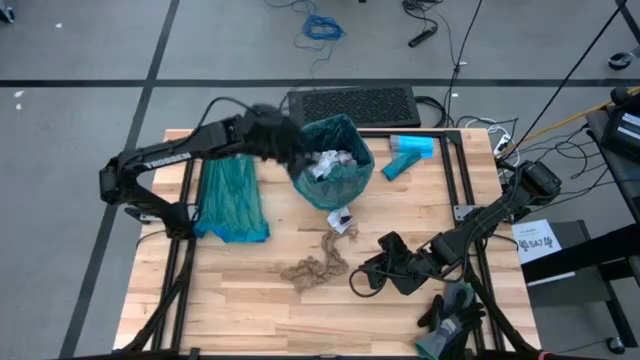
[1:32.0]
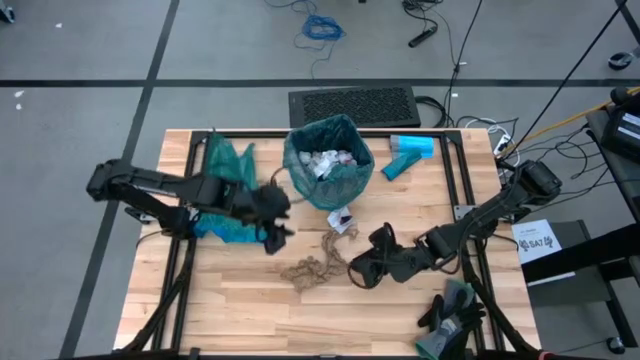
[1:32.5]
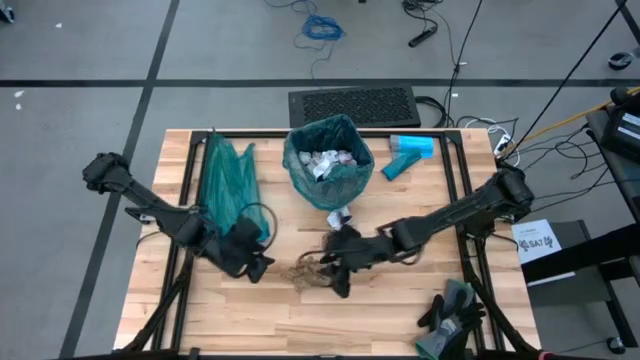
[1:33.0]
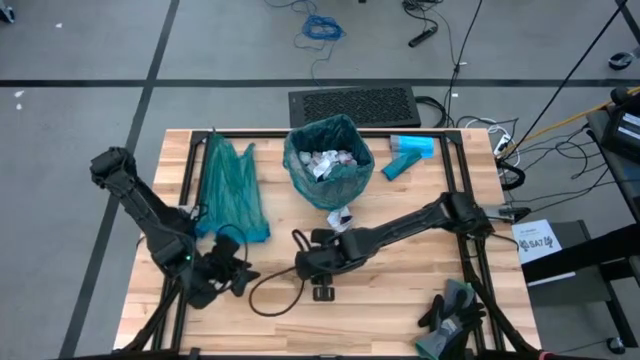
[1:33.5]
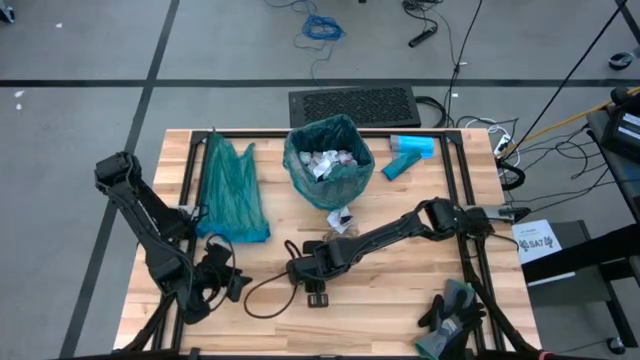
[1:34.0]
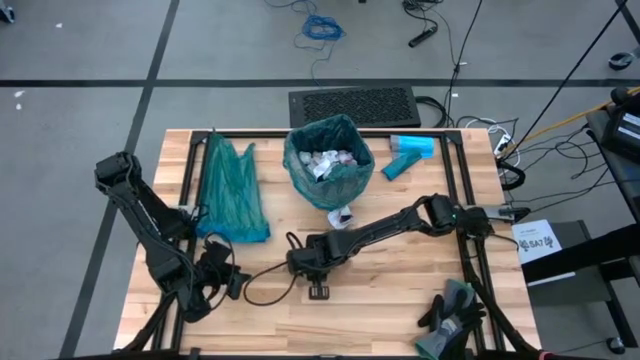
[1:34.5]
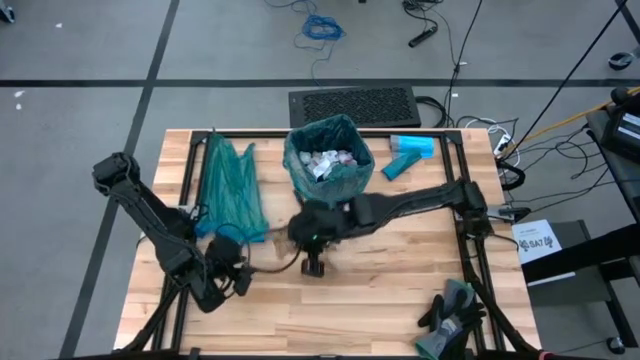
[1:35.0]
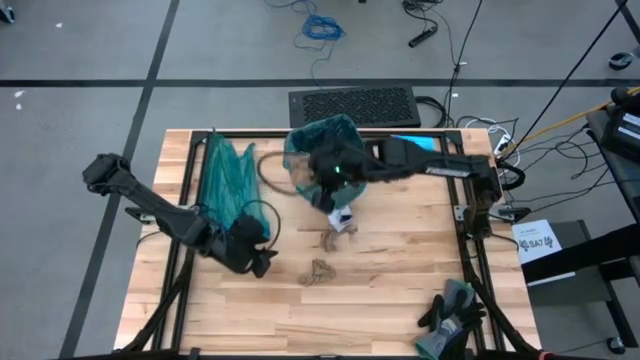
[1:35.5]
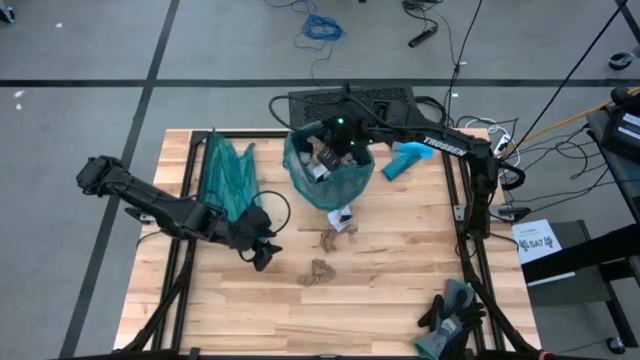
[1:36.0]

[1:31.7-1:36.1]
Task: place trash/remove bag and relplace
Put the brown napkin into the blue trash bag inside the black trash bin

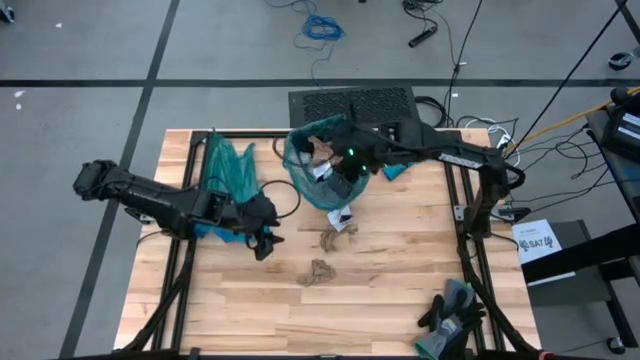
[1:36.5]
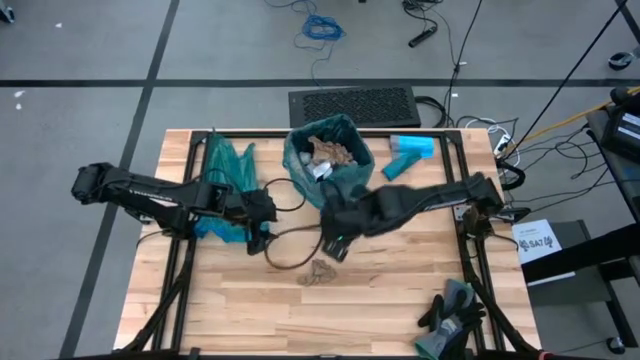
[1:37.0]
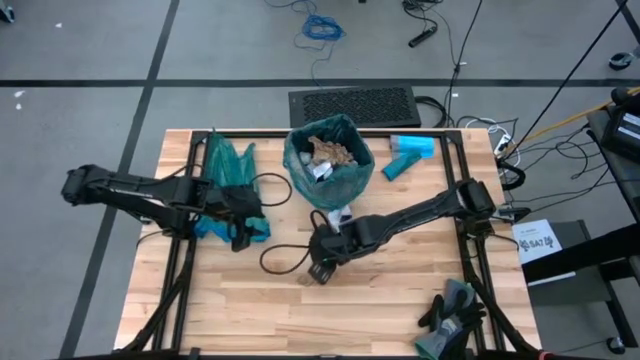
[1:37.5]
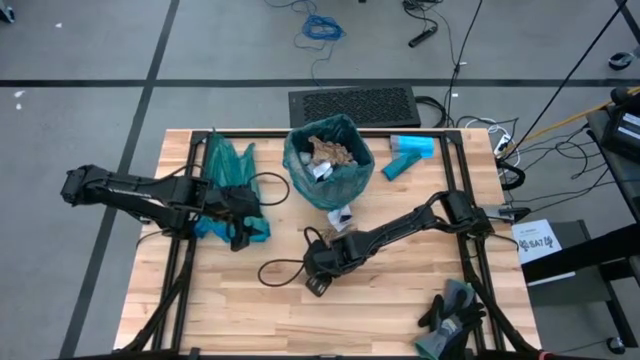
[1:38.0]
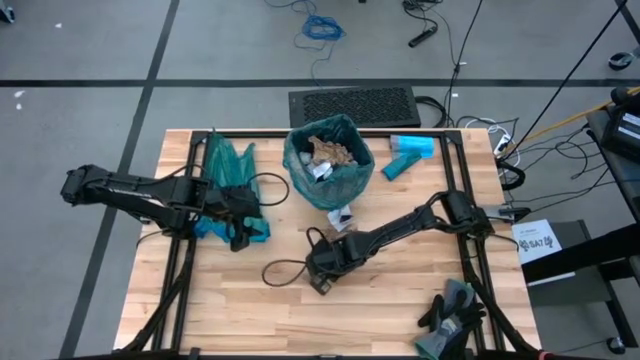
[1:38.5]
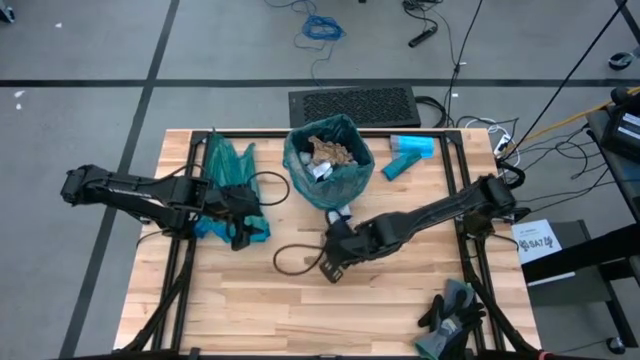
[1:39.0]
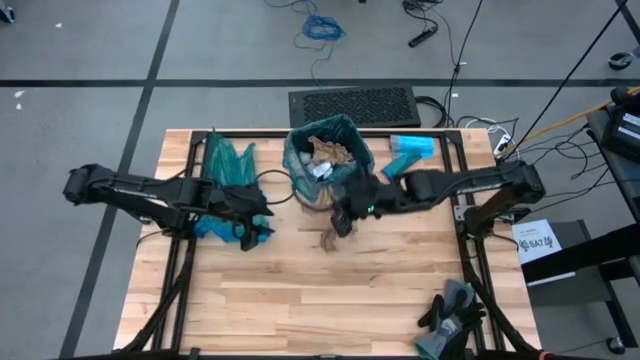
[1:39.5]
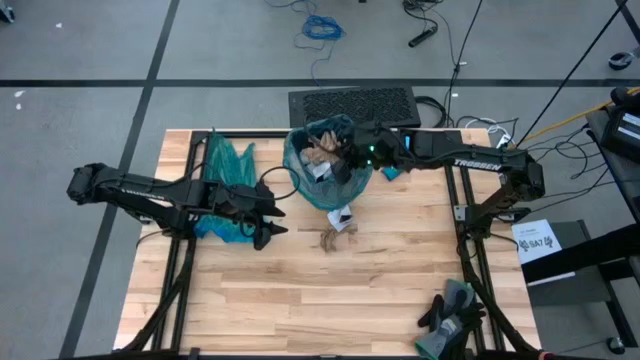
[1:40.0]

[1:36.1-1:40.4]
Put the brown napkin into the blue trash bag inside the black trash bin

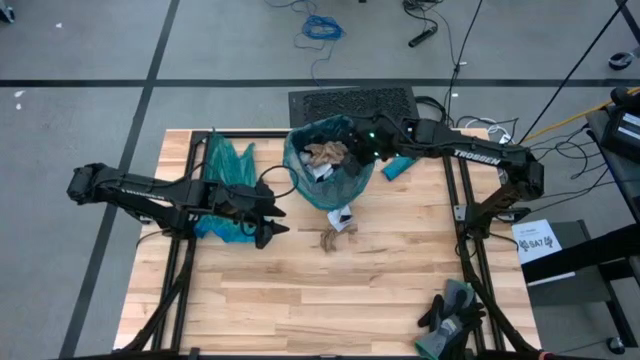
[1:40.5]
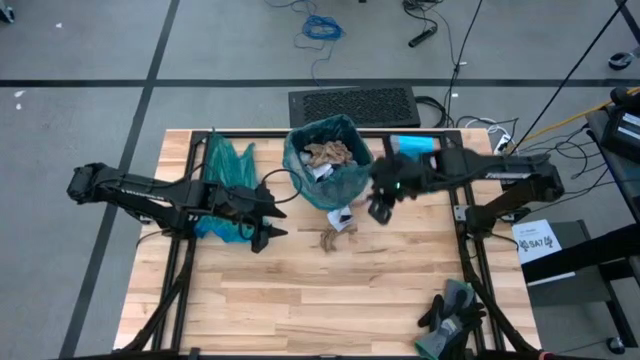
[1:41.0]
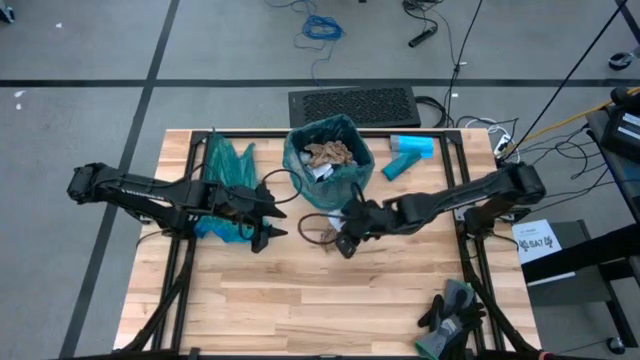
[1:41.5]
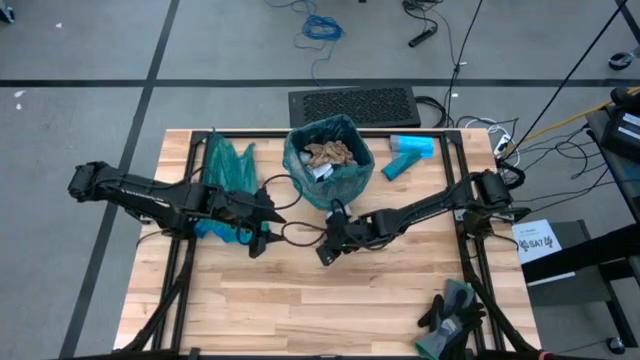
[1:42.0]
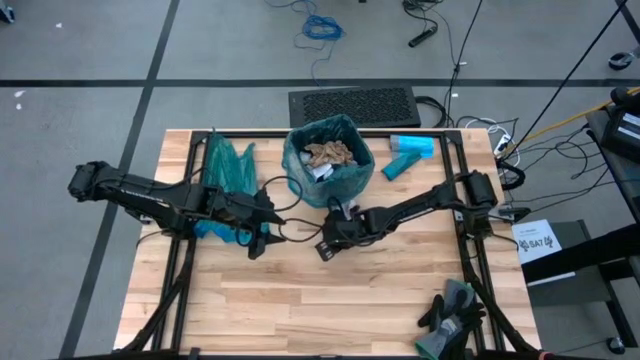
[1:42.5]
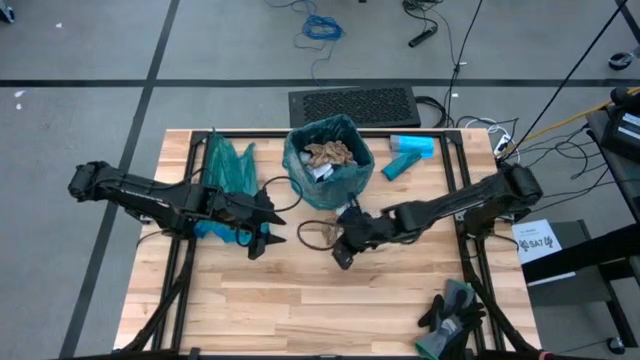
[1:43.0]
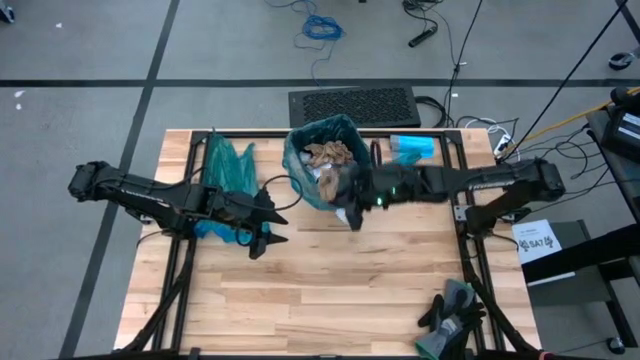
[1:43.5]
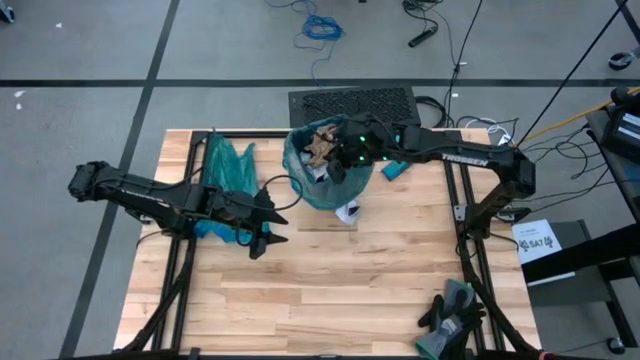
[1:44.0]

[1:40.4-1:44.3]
Put the brown napkin into the blue trash bag inside the black trash bin

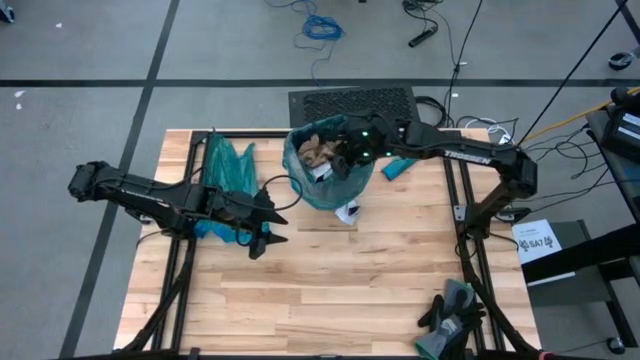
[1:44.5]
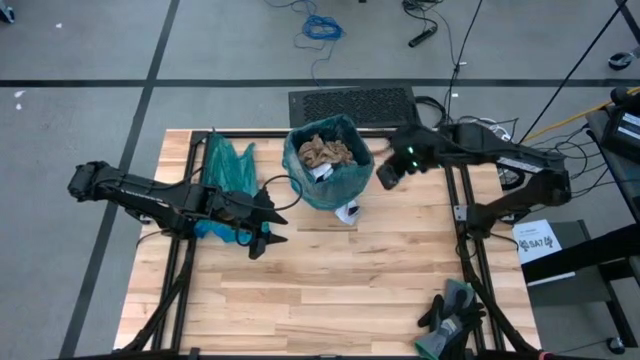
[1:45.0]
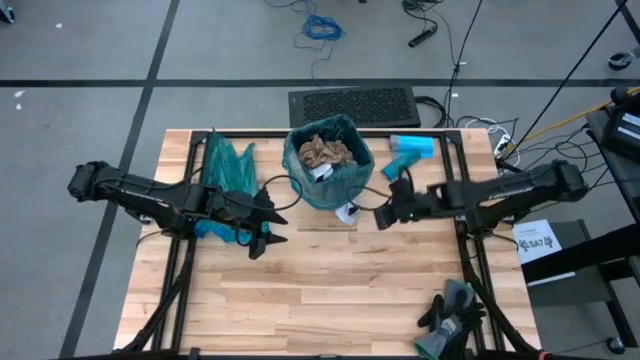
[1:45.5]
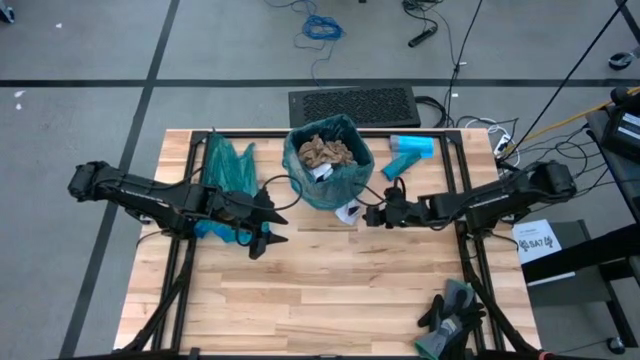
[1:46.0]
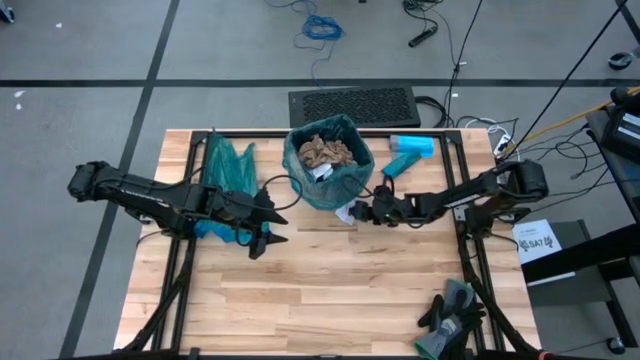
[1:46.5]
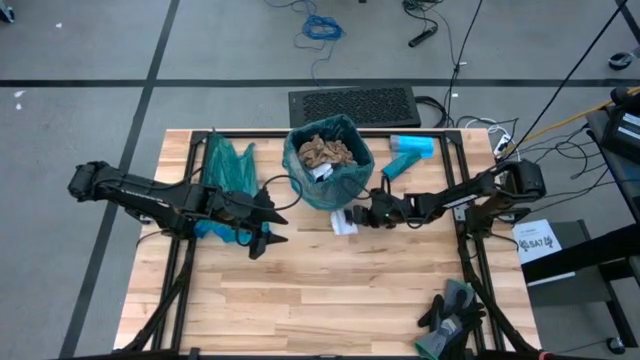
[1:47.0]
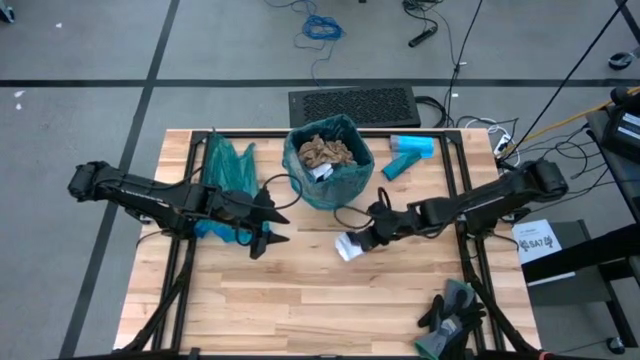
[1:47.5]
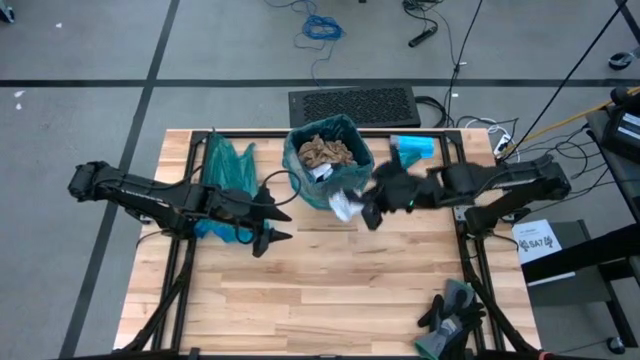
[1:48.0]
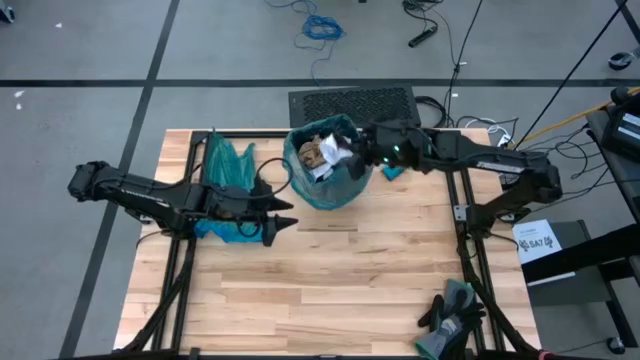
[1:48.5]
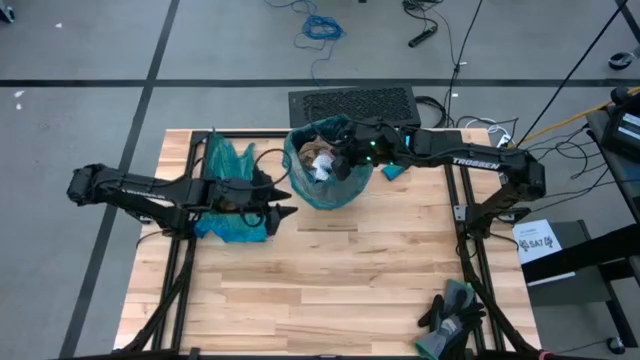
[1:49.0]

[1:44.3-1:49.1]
Put the white paper into the blue trash bag inside the black trash bin
